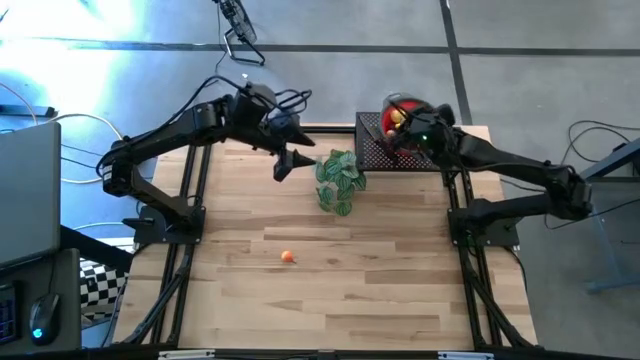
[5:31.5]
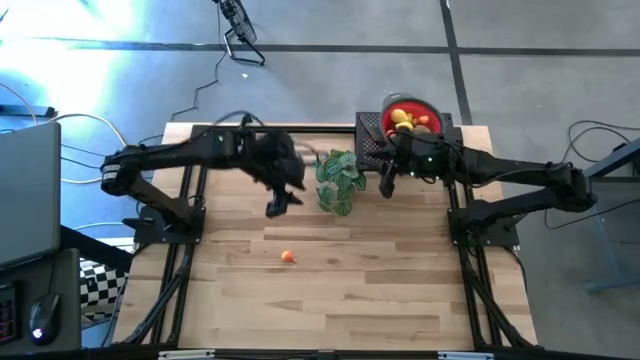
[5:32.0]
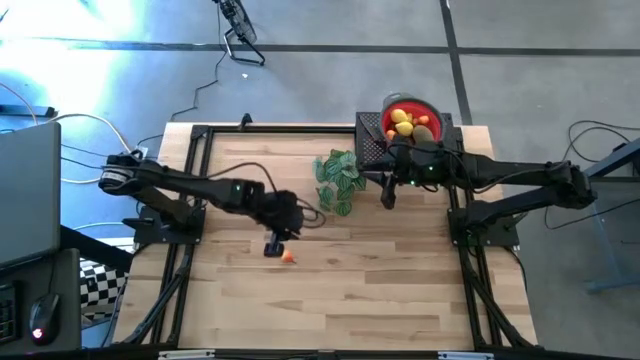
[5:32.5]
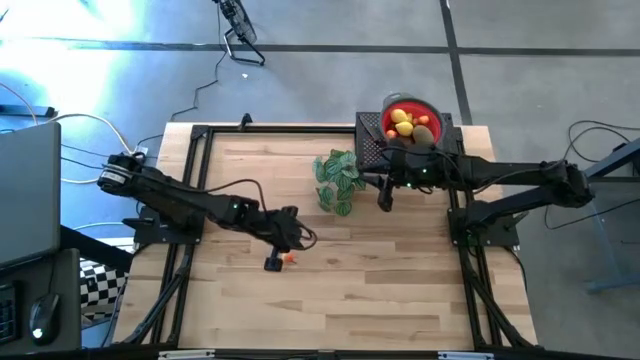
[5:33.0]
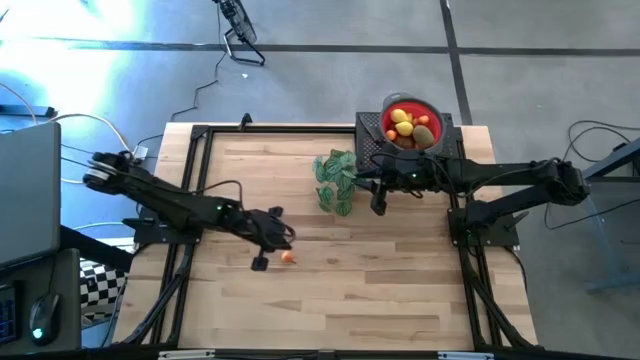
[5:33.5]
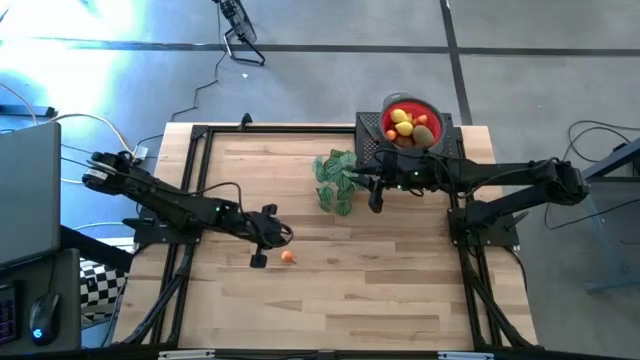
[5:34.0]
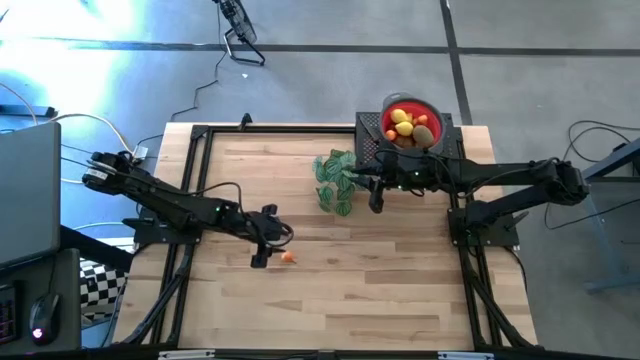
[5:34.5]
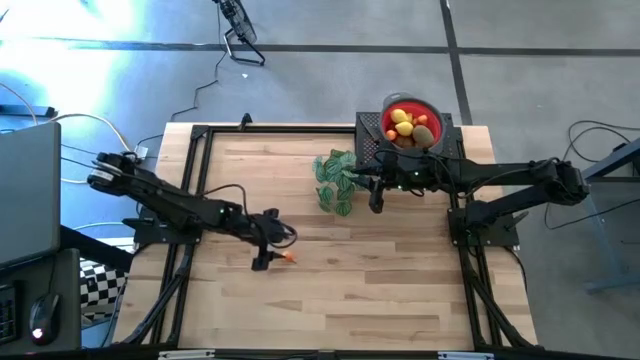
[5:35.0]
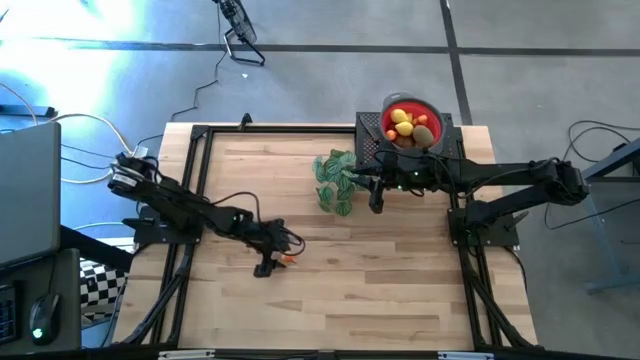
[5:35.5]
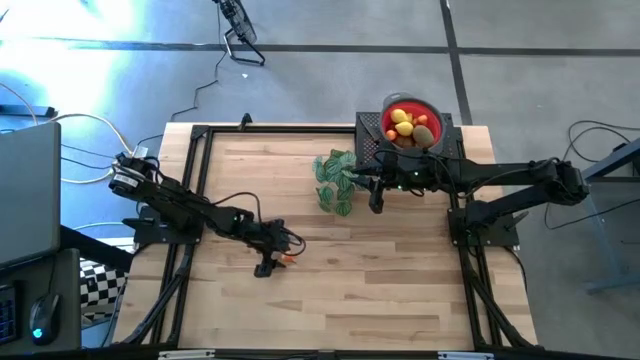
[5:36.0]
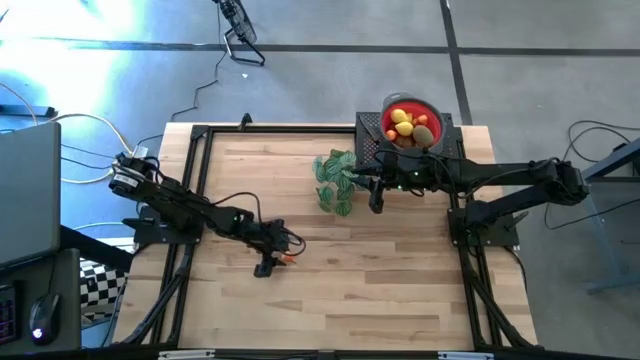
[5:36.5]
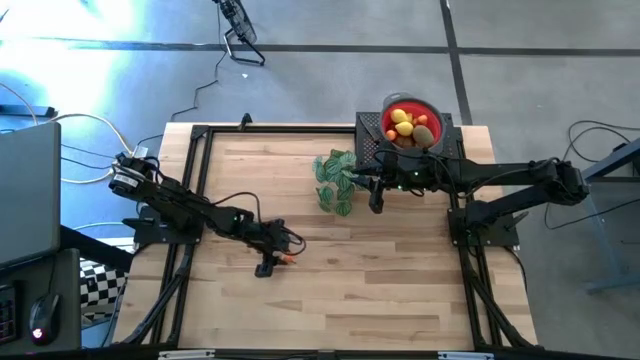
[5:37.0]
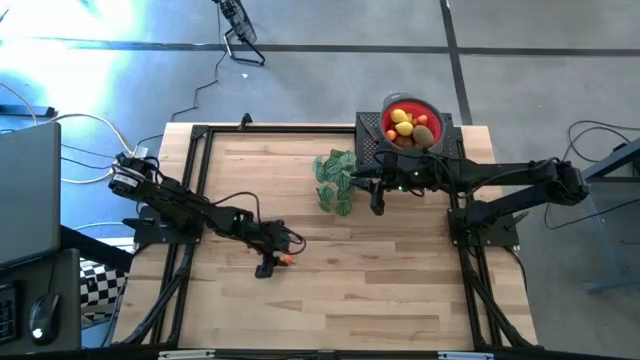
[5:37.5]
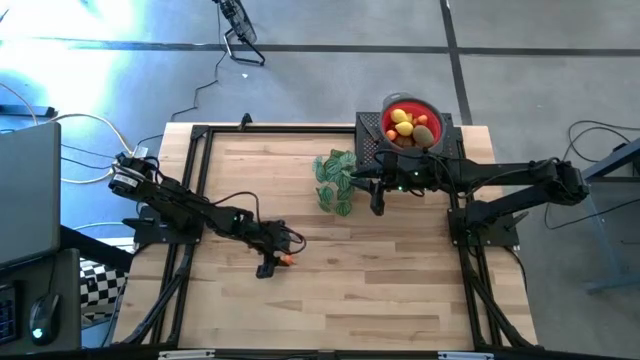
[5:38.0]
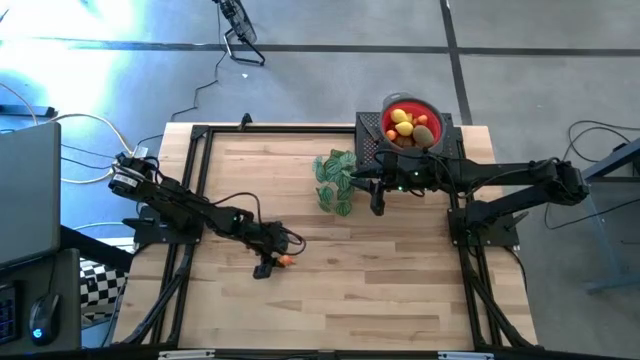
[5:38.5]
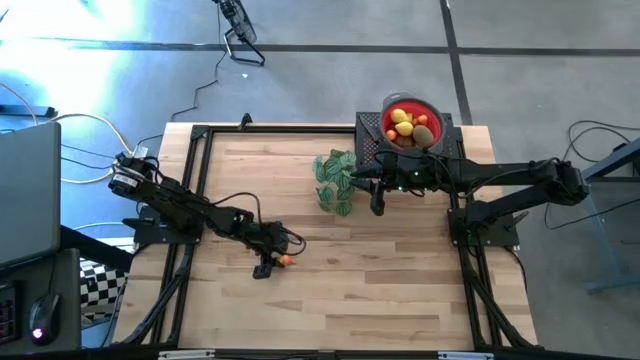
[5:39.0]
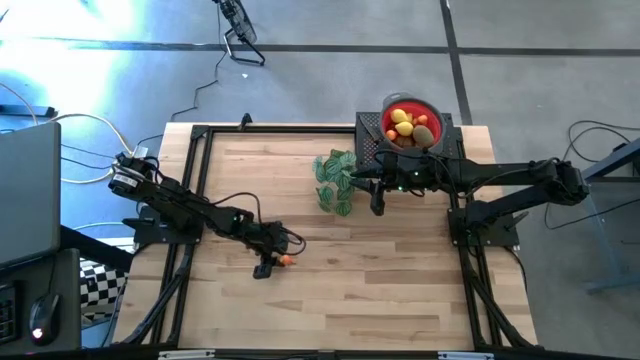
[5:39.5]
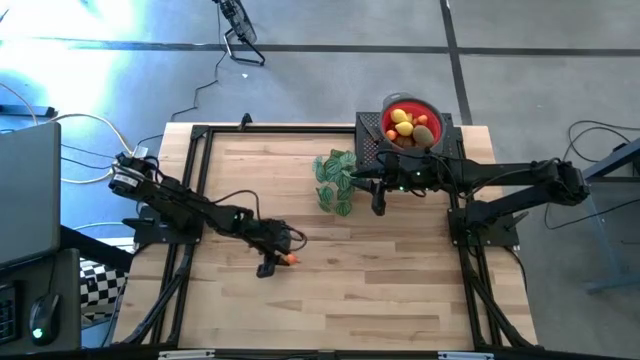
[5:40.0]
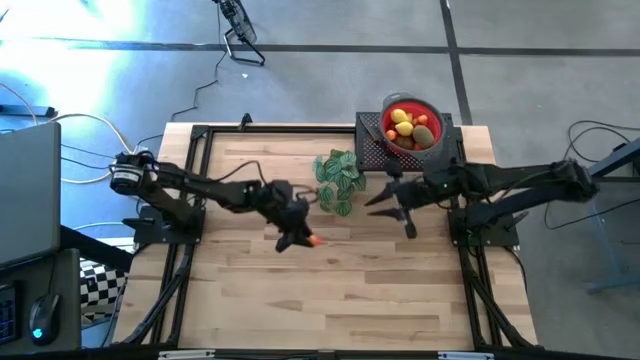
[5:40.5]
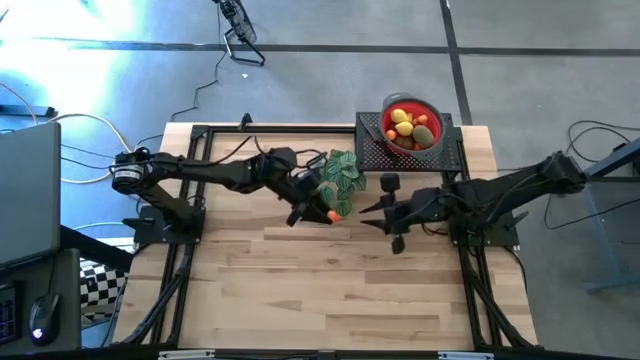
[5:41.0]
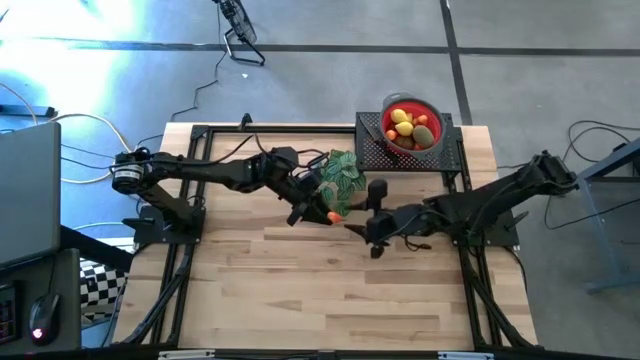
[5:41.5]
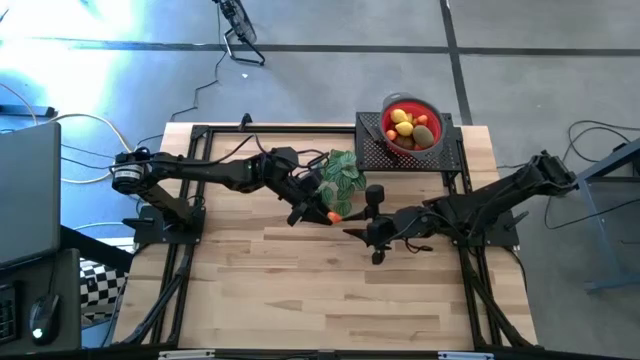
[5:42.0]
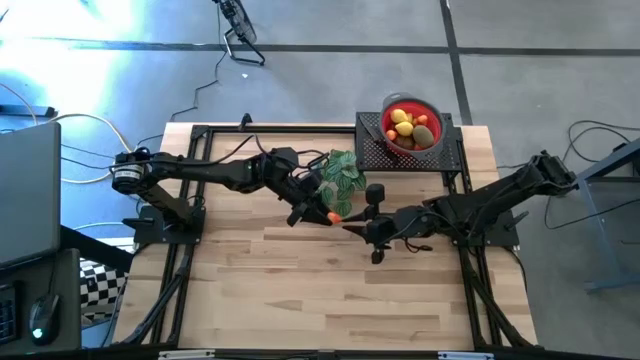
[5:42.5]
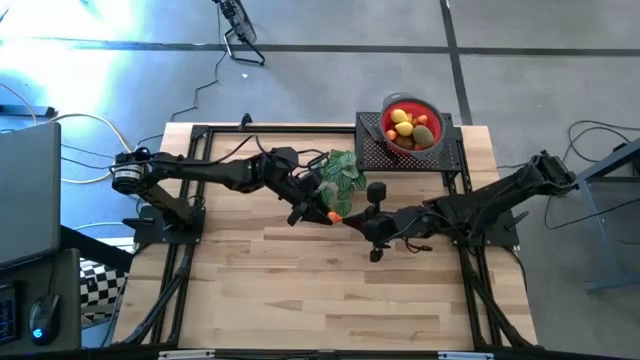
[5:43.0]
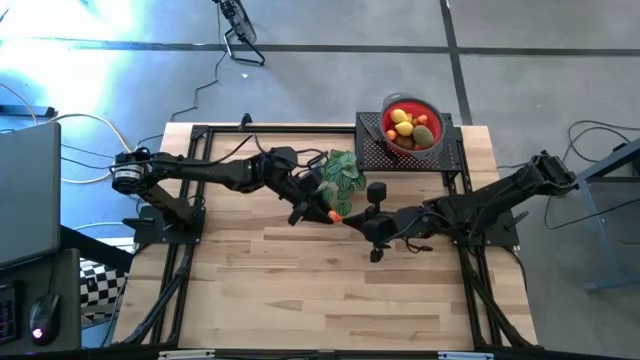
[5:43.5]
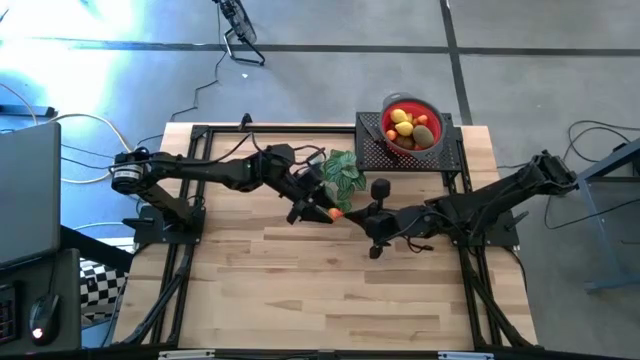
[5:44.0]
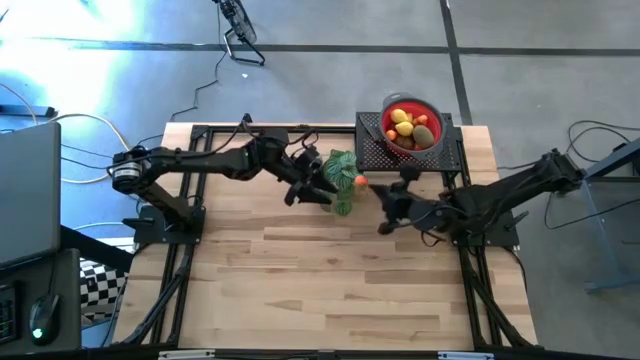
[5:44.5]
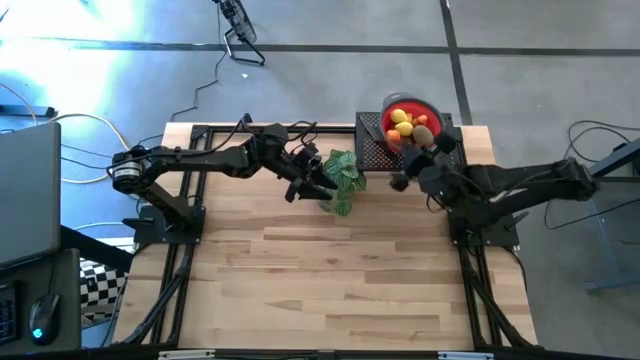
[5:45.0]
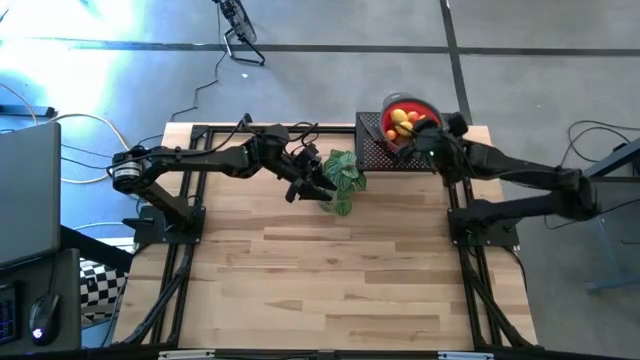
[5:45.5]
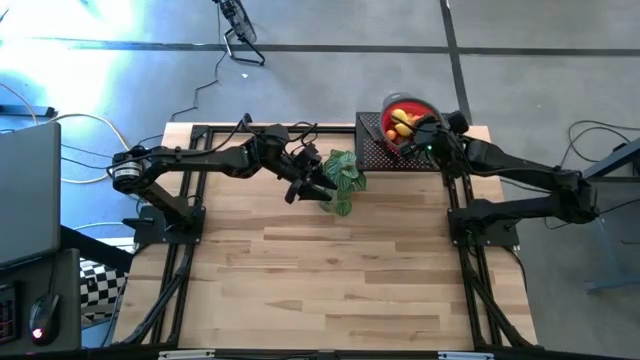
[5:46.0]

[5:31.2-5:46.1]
Task: Pick & Place Fruit
Put the orange pear into the red colander

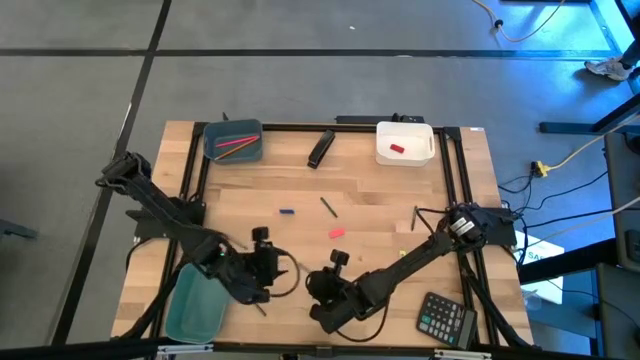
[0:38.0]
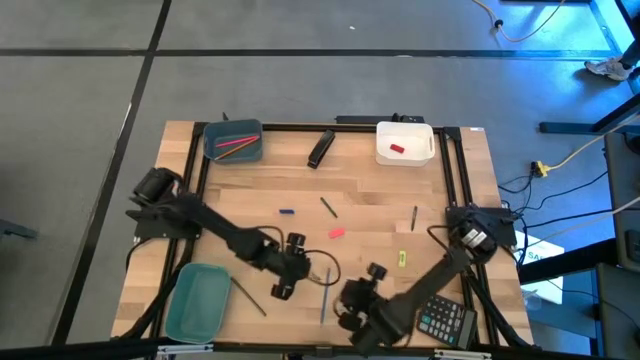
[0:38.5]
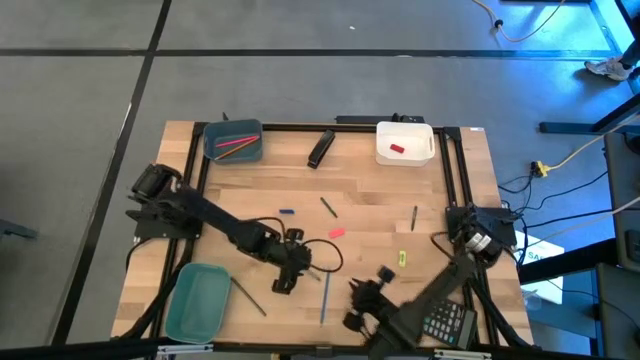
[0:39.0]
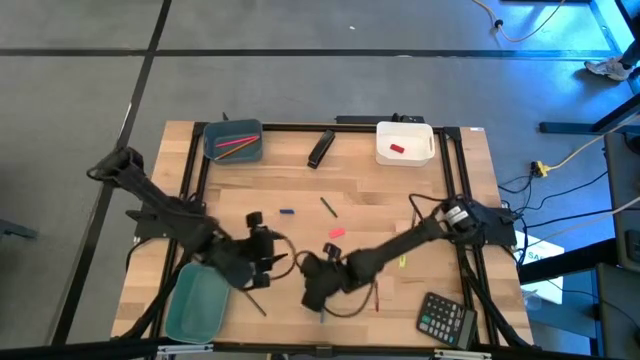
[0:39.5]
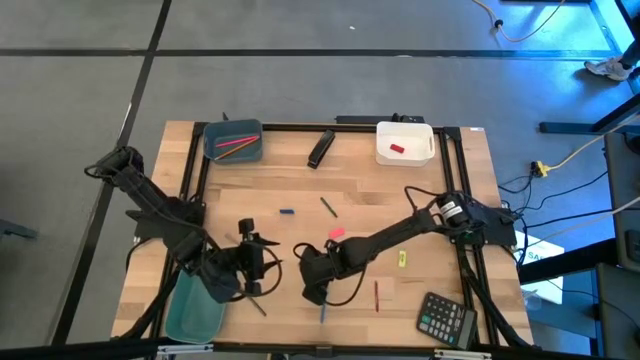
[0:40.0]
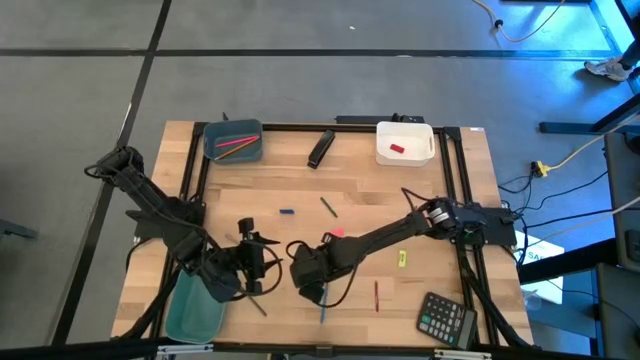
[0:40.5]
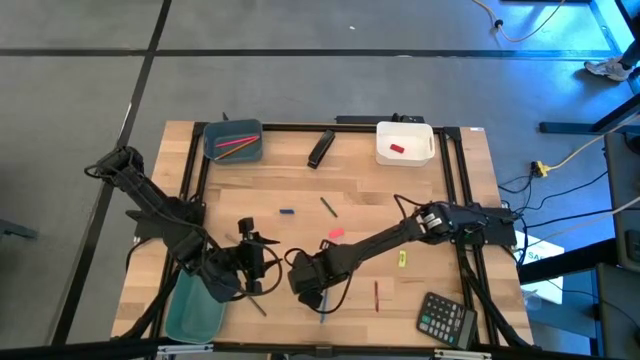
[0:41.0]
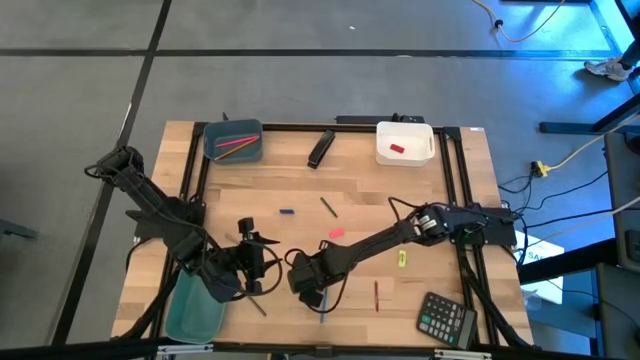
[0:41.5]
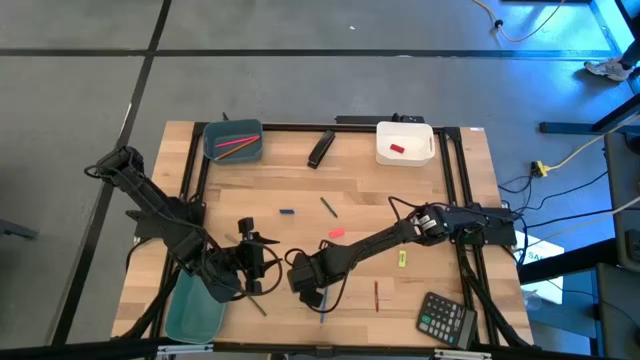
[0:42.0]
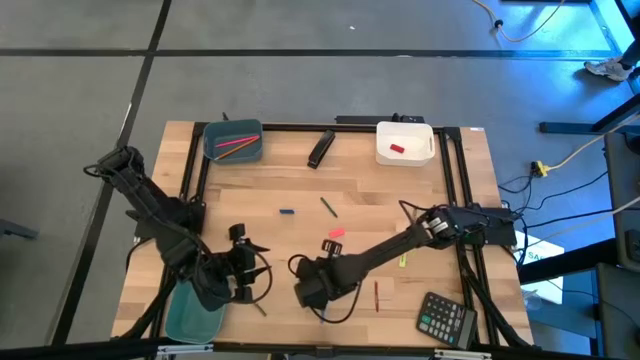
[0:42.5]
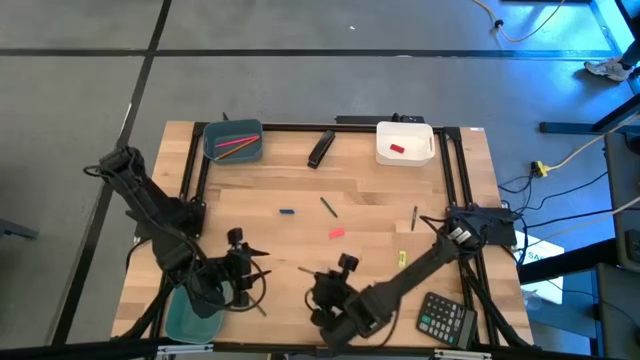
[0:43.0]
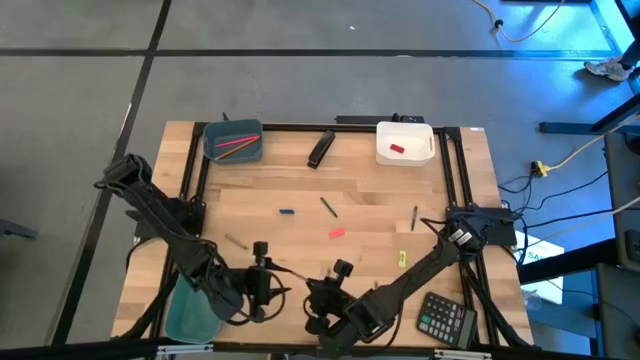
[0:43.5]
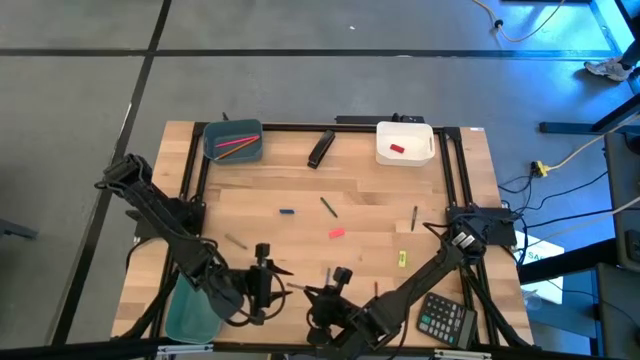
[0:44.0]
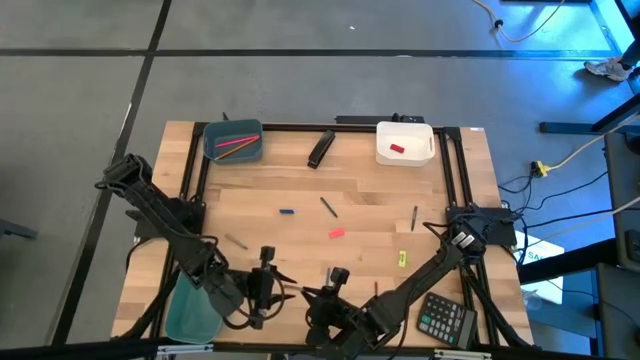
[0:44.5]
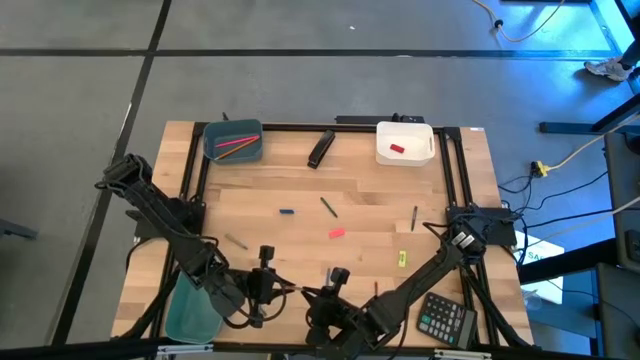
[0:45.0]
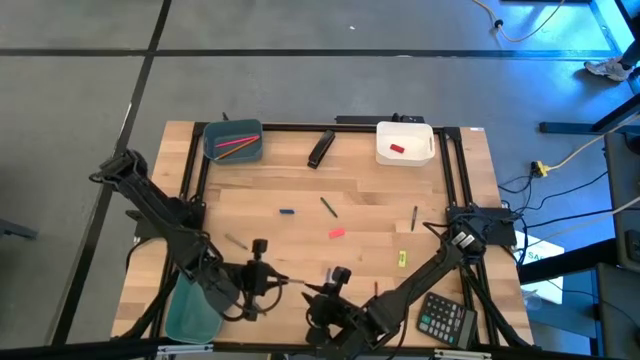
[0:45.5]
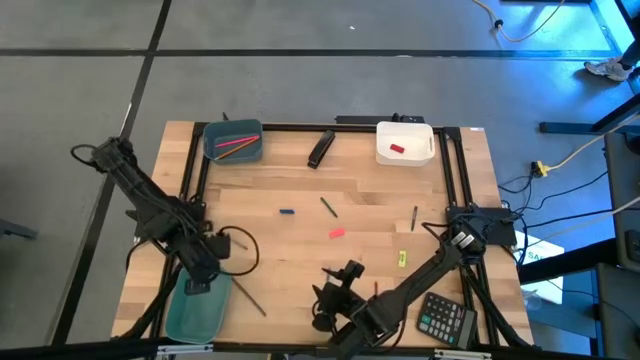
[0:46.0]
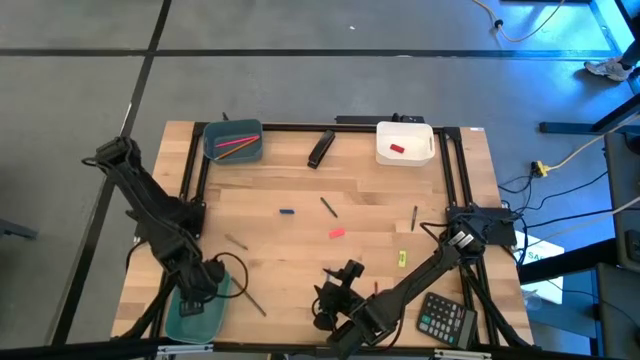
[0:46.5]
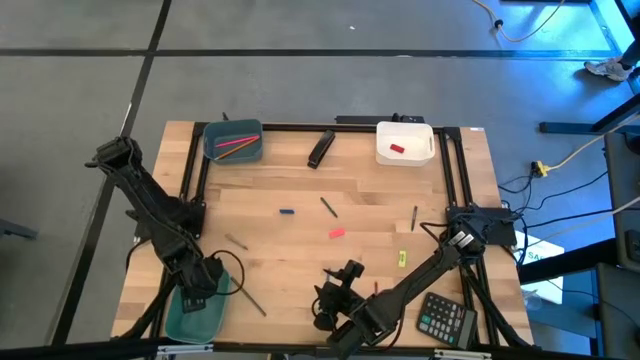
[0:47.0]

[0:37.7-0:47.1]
Task: Sort crayons/erasers/pens/pencils in bins
Put the gray crayon into the green bin
